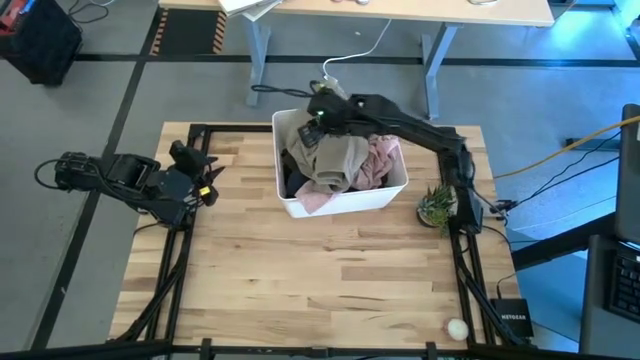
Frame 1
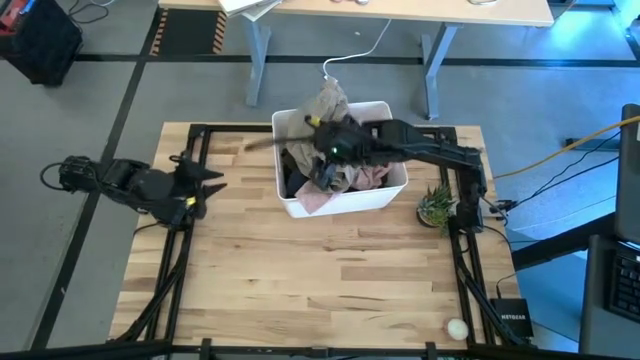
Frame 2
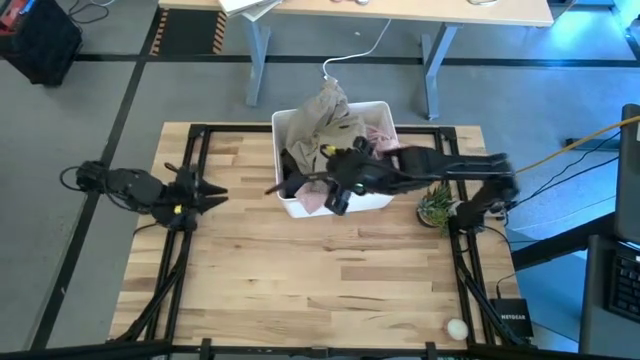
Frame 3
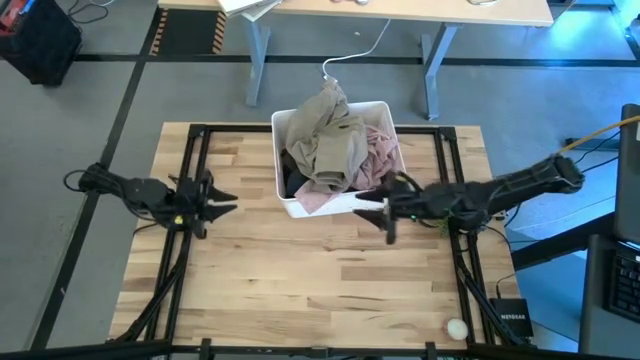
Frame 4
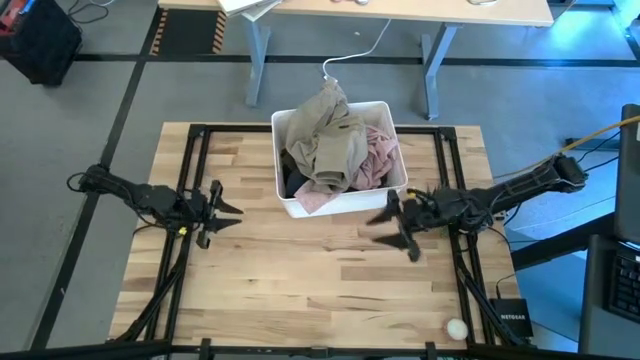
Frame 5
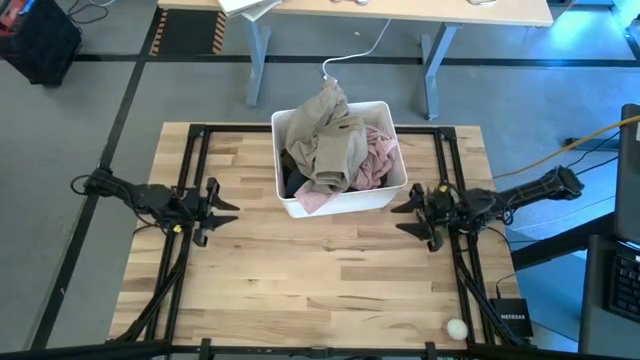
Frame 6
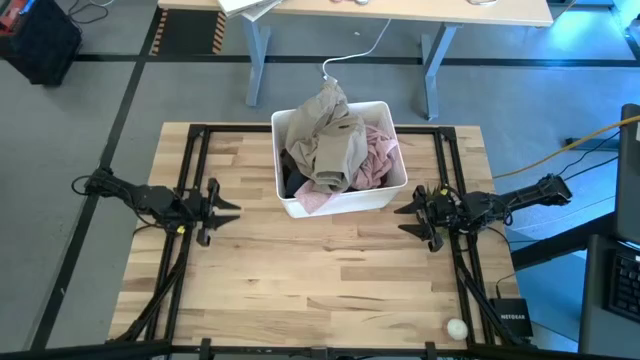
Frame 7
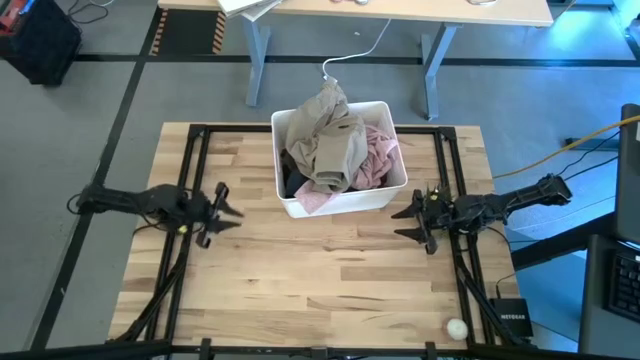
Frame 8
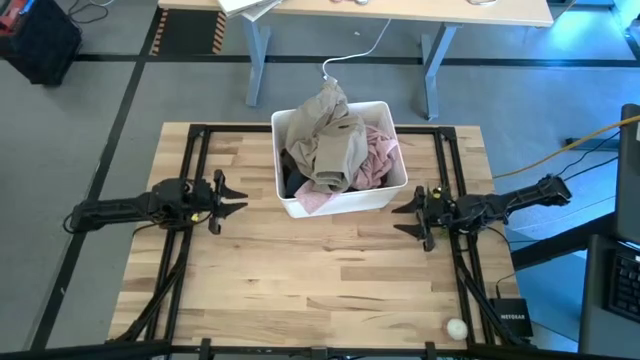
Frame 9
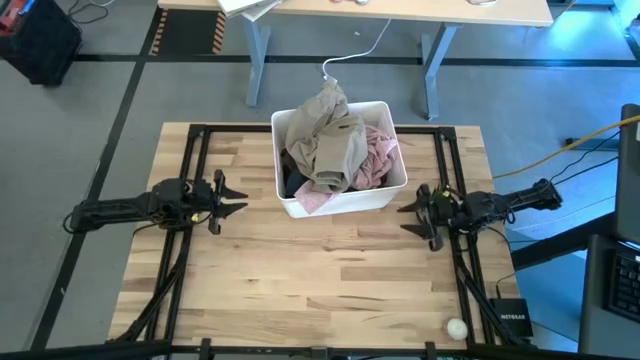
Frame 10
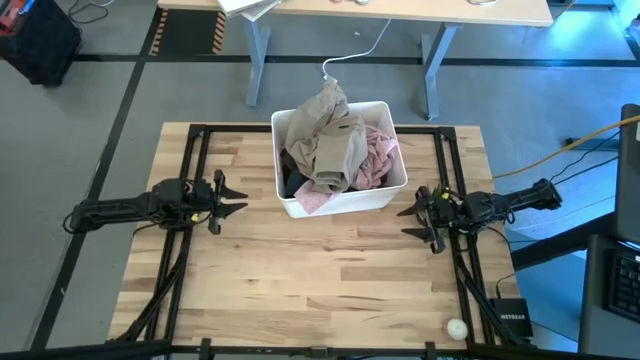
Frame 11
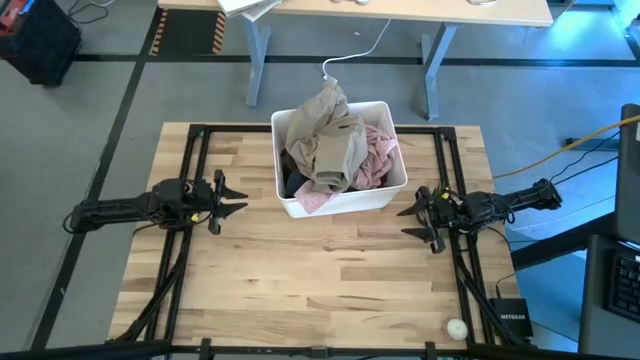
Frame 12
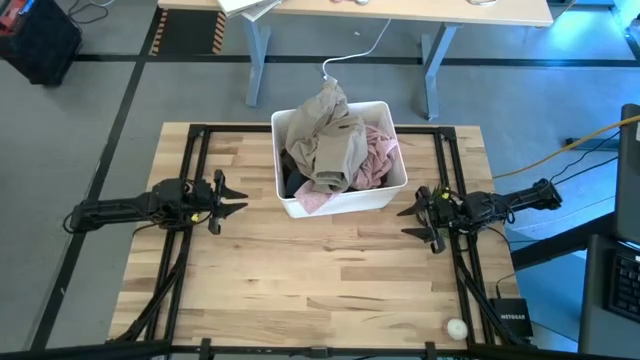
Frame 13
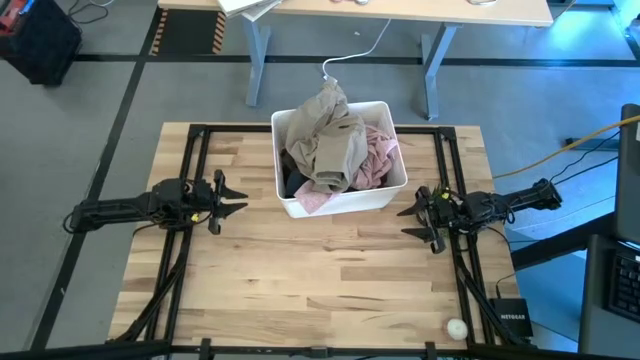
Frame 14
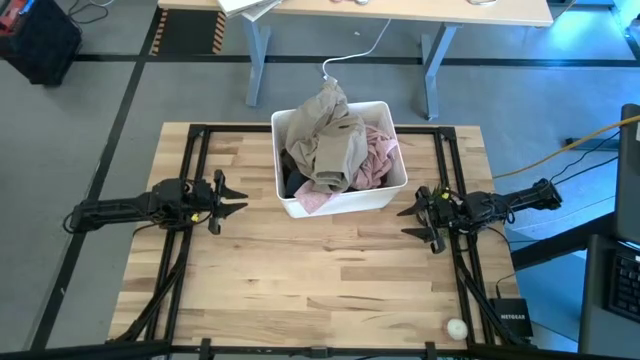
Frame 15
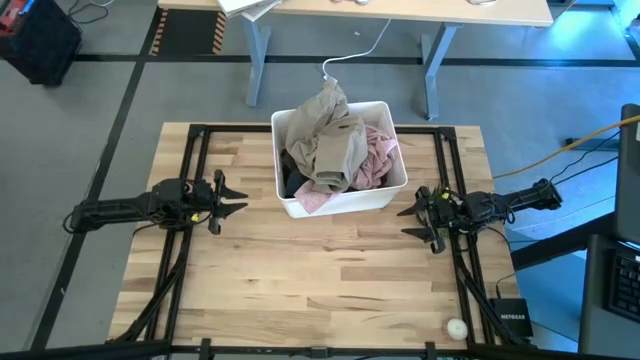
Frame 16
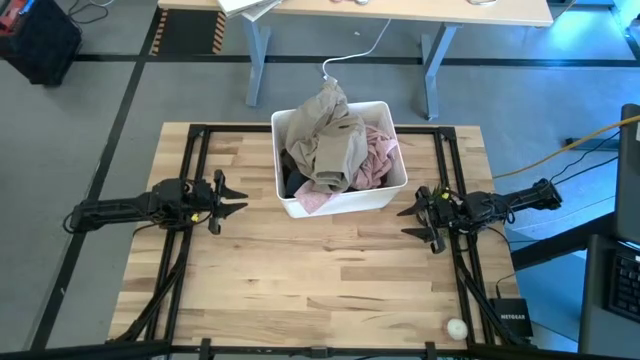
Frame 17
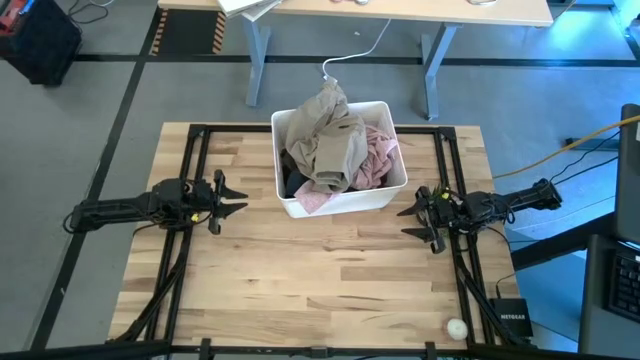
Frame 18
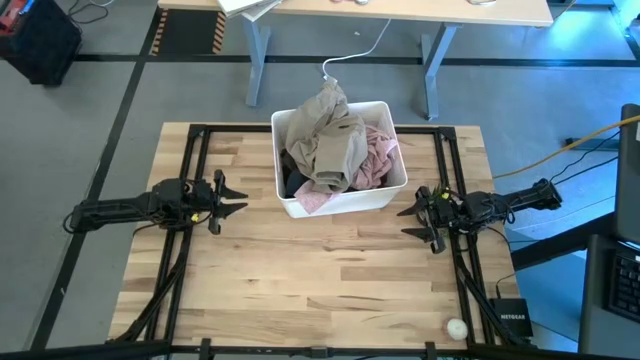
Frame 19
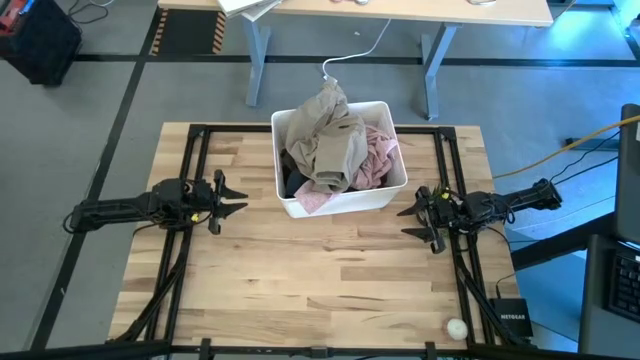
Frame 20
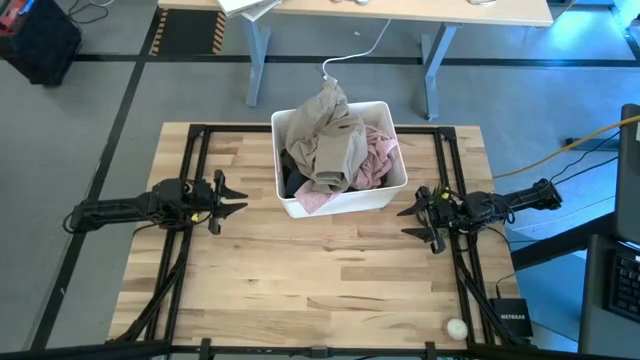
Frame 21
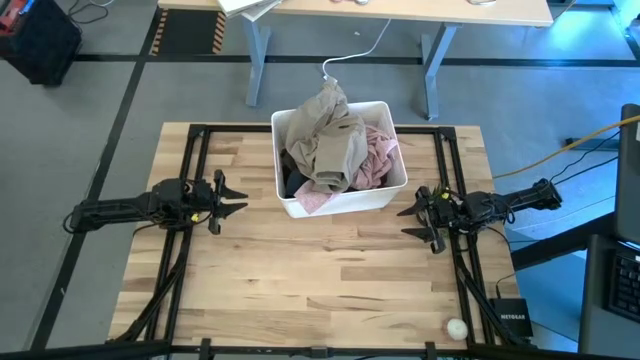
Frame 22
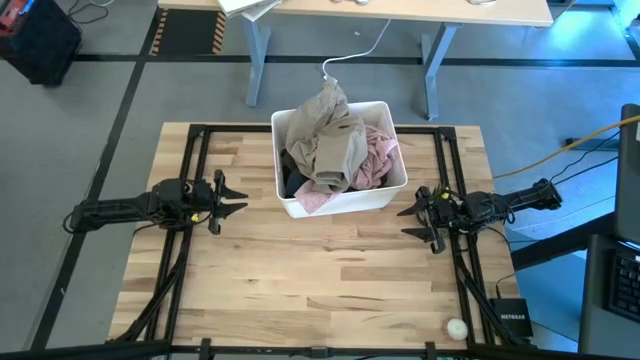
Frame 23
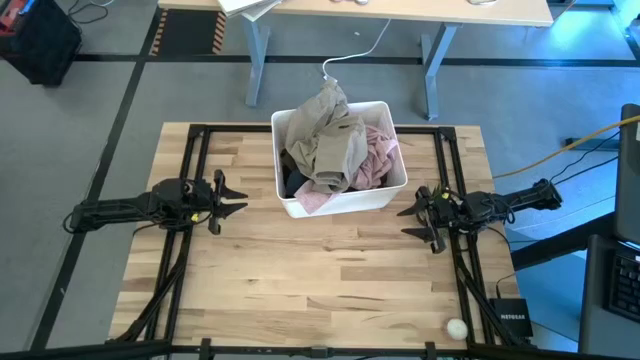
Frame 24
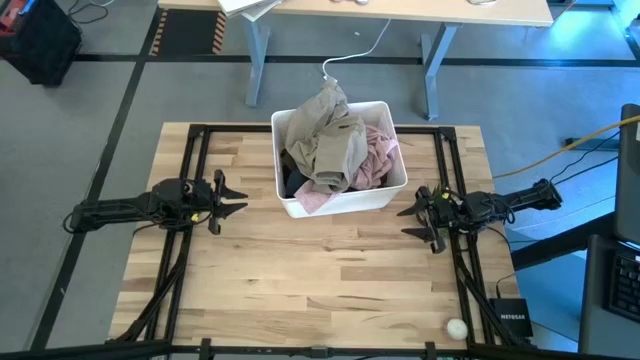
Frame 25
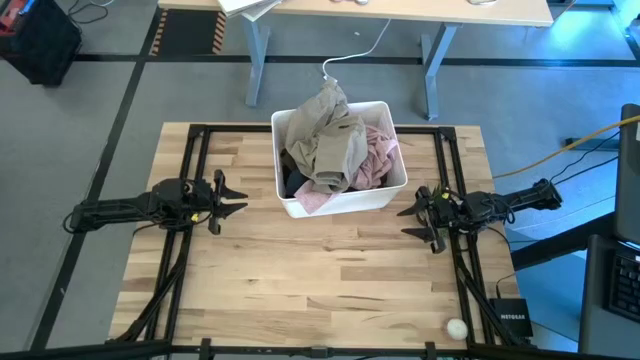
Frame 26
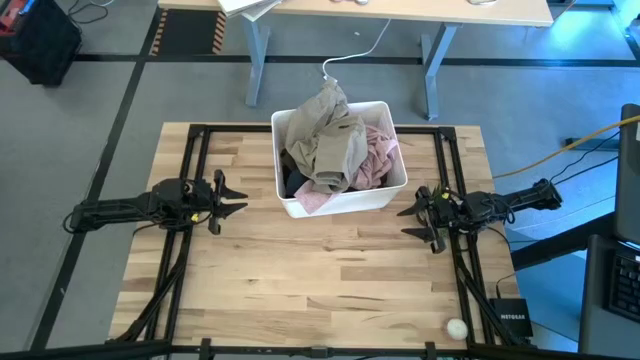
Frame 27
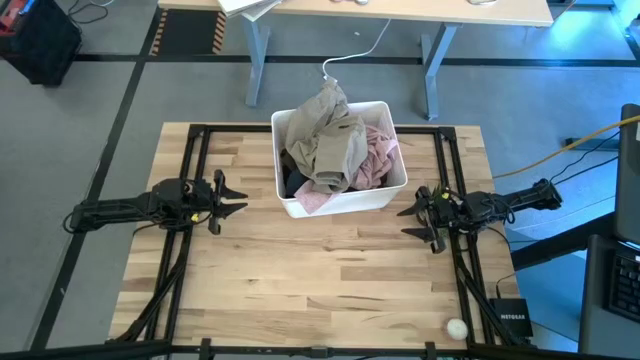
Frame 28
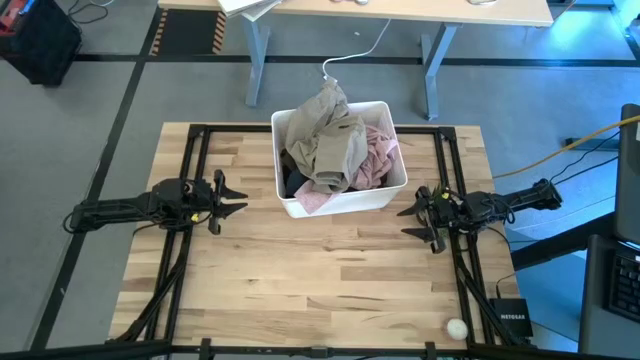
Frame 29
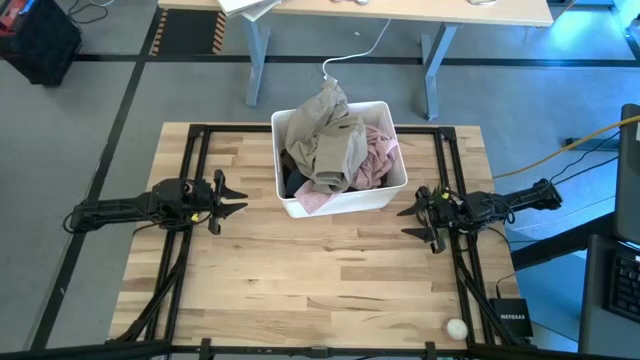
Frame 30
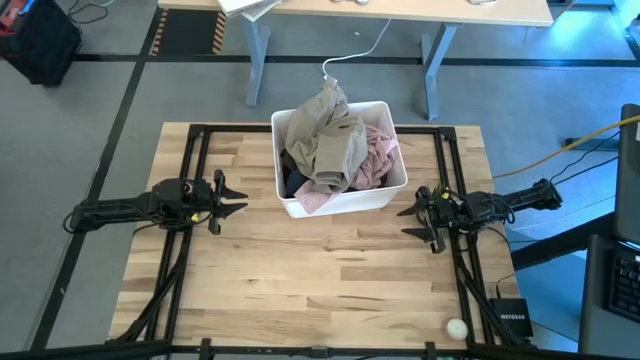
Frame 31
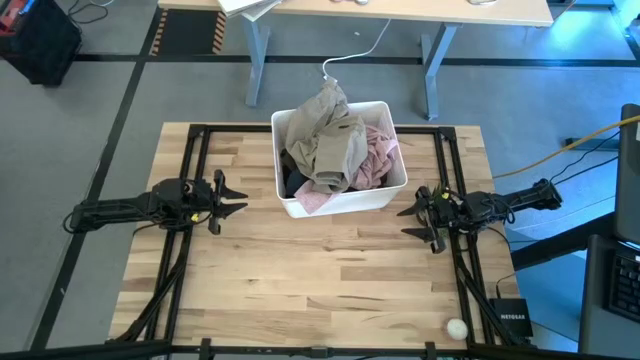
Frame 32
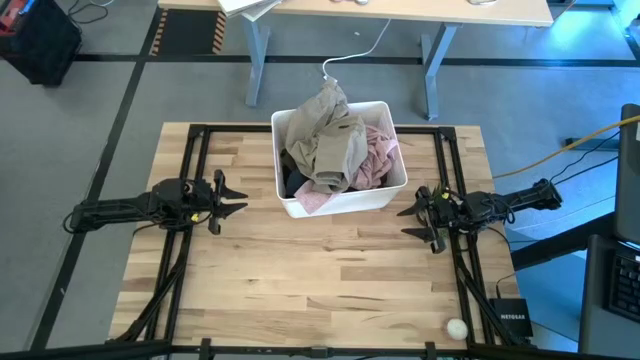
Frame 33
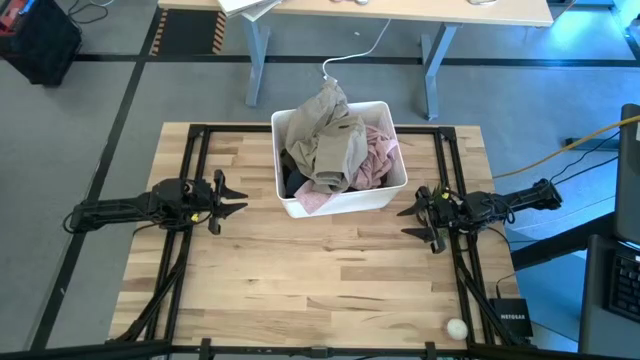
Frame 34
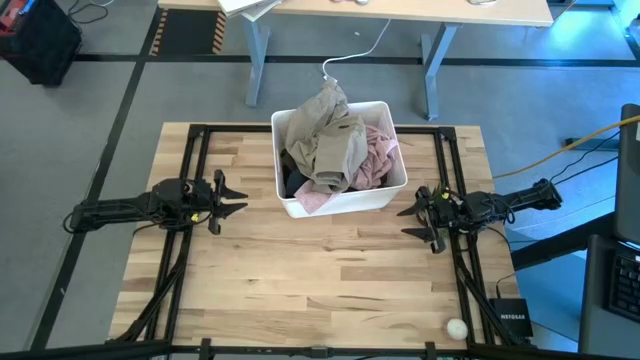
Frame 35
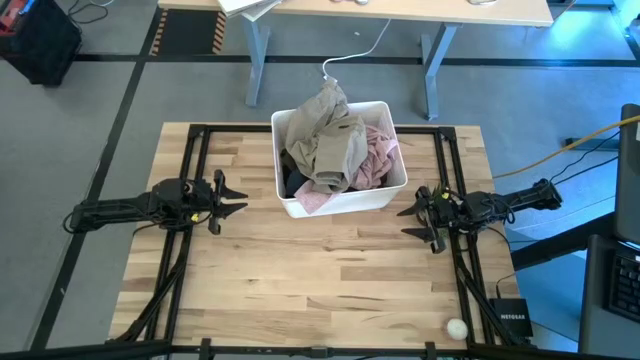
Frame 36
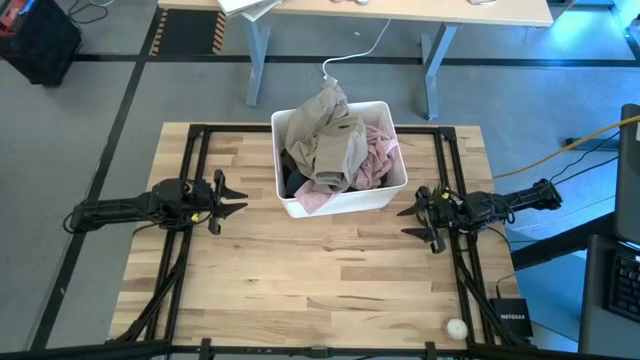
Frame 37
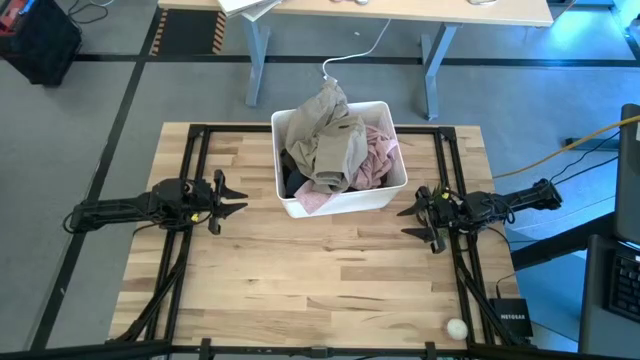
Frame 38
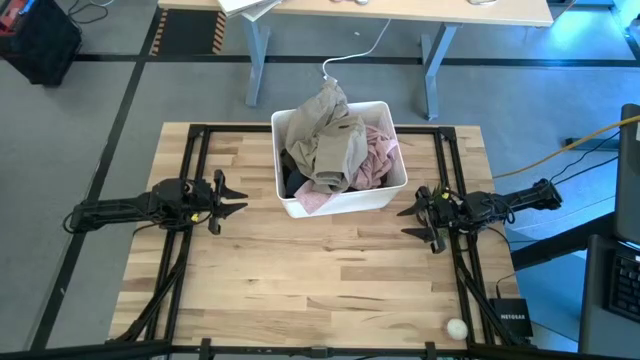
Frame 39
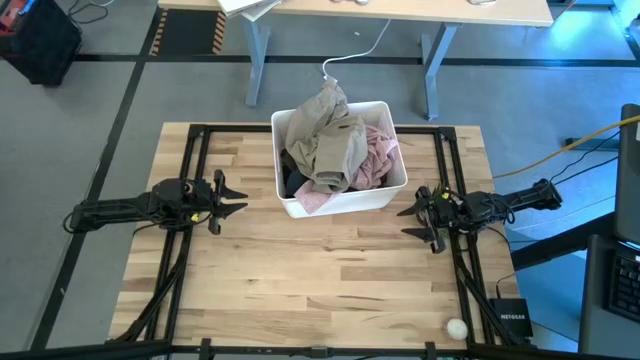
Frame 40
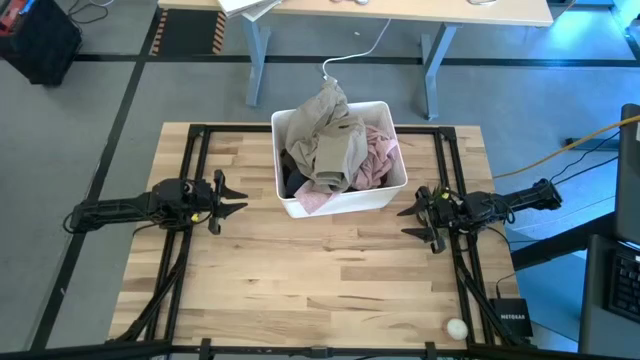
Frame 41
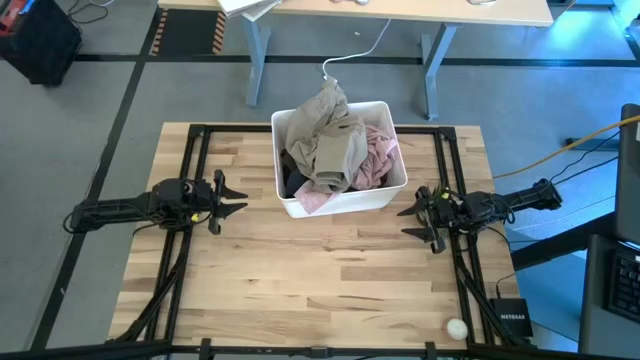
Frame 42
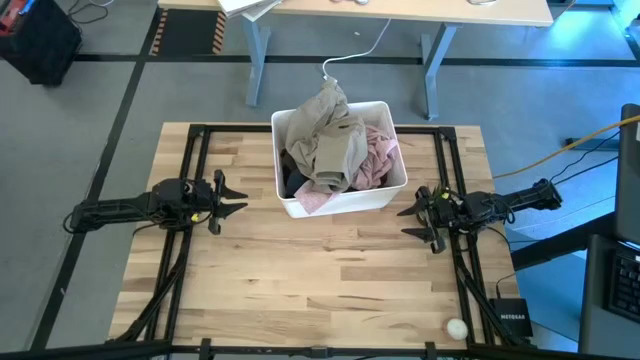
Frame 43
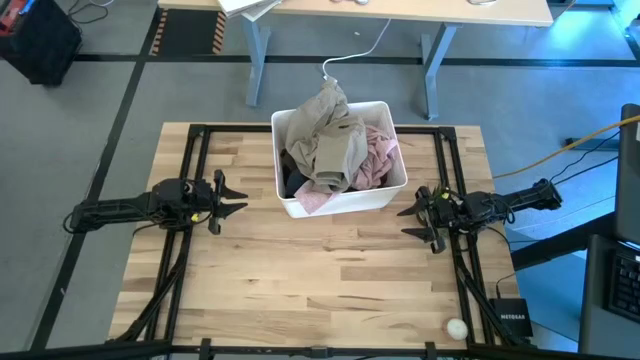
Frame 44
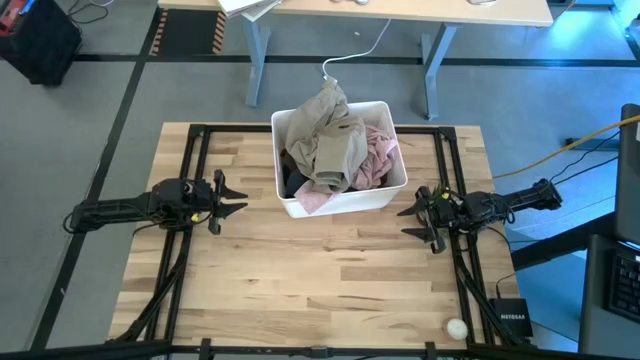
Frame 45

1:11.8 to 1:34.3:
Task: Sort clothes
Return to Home Position
